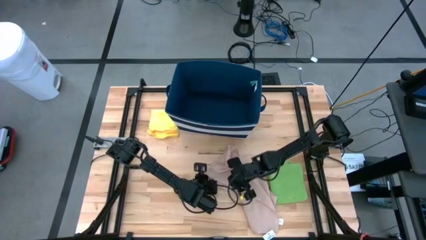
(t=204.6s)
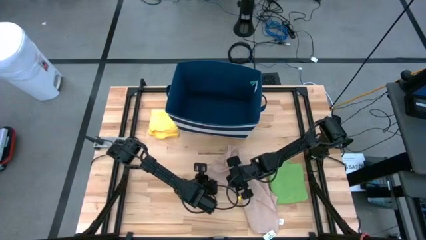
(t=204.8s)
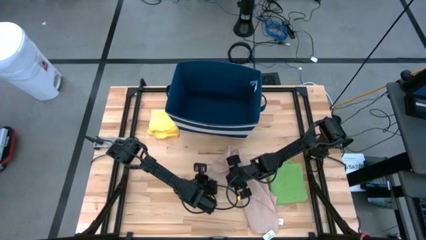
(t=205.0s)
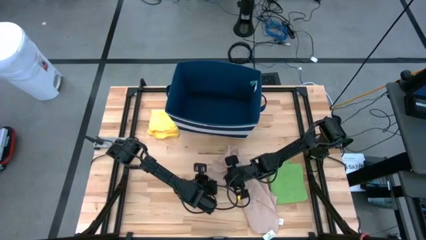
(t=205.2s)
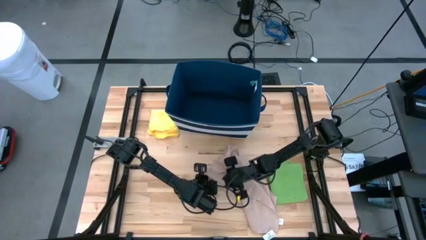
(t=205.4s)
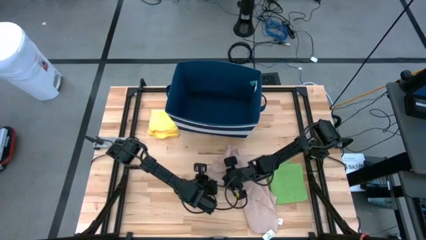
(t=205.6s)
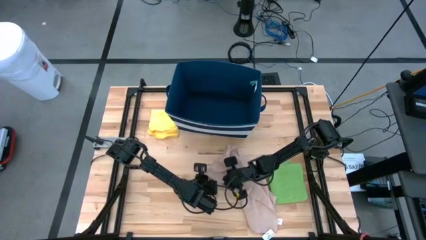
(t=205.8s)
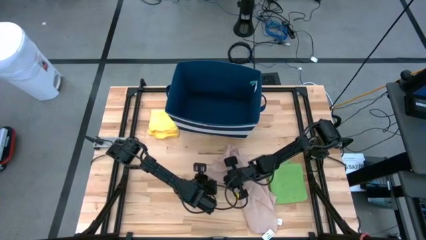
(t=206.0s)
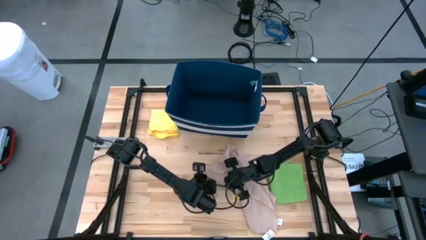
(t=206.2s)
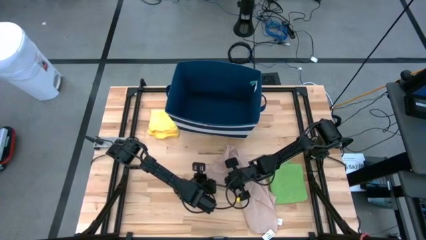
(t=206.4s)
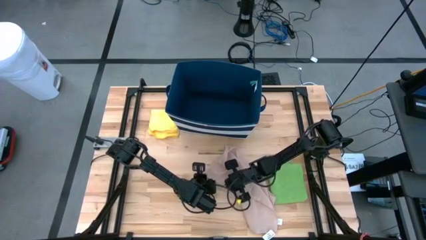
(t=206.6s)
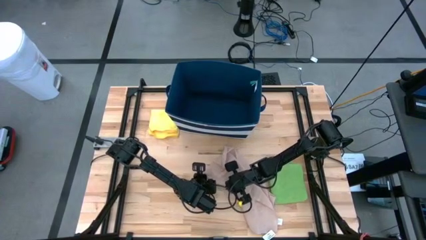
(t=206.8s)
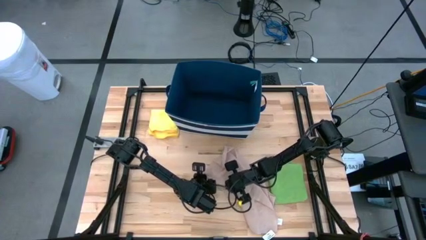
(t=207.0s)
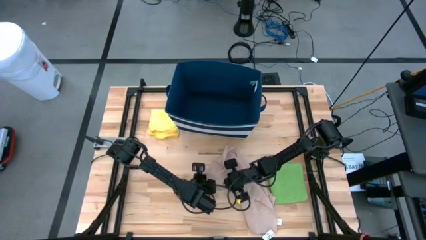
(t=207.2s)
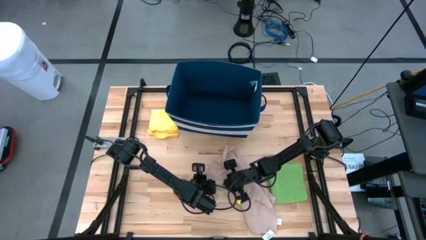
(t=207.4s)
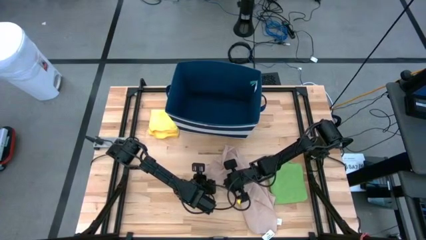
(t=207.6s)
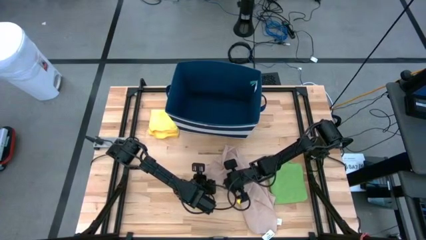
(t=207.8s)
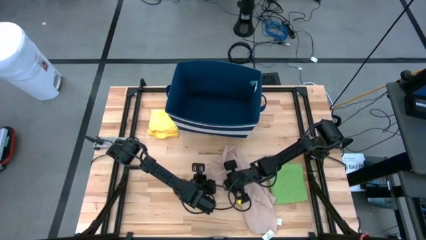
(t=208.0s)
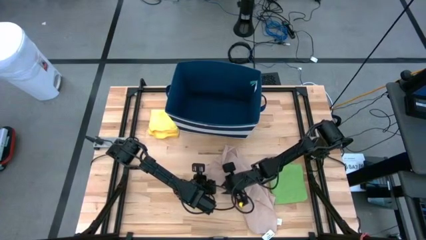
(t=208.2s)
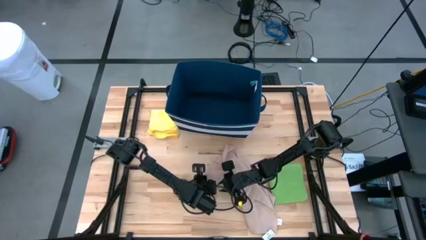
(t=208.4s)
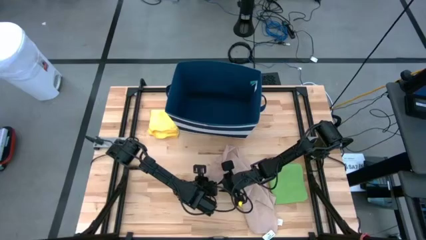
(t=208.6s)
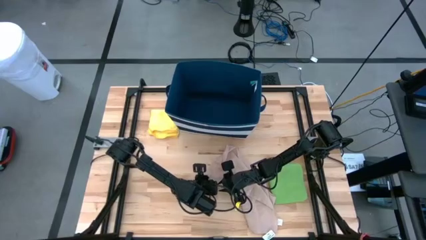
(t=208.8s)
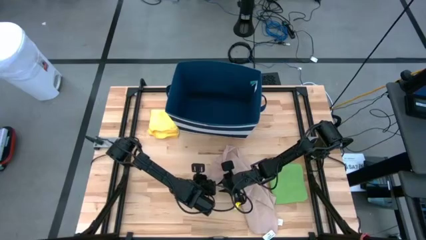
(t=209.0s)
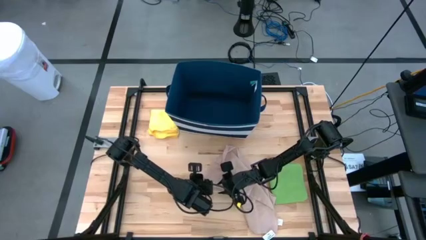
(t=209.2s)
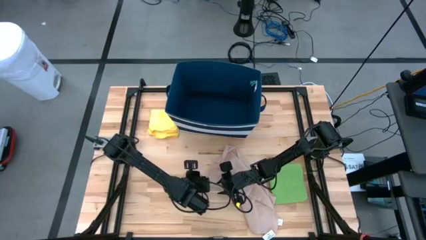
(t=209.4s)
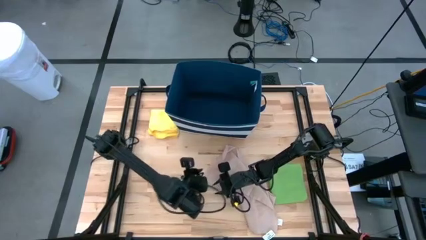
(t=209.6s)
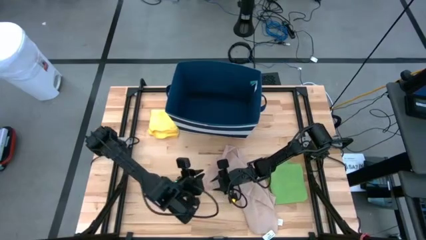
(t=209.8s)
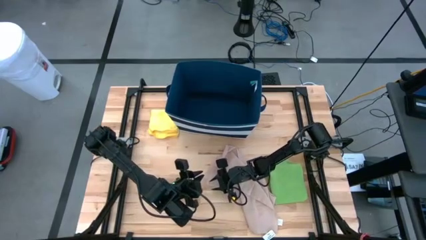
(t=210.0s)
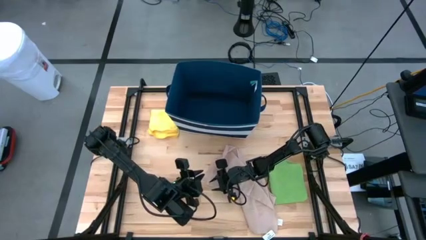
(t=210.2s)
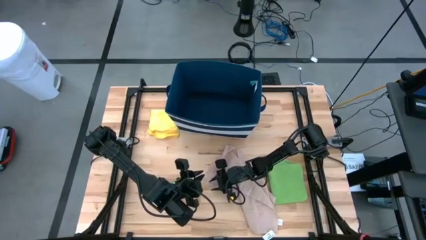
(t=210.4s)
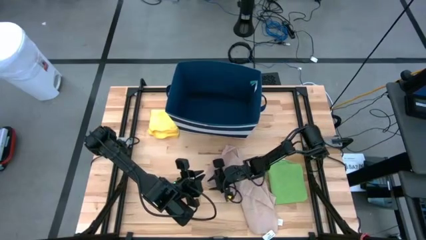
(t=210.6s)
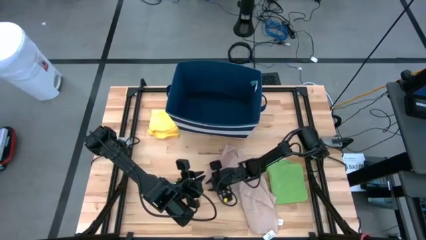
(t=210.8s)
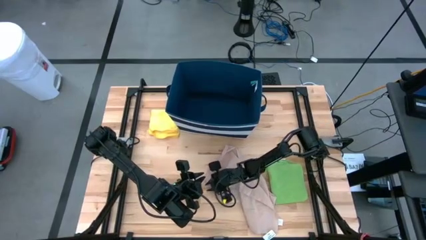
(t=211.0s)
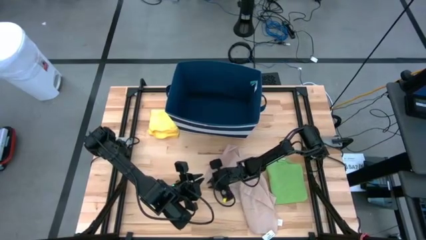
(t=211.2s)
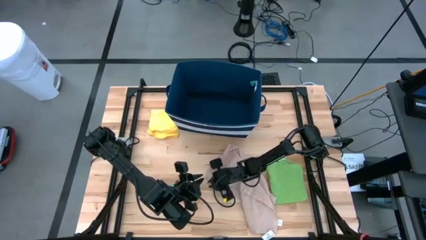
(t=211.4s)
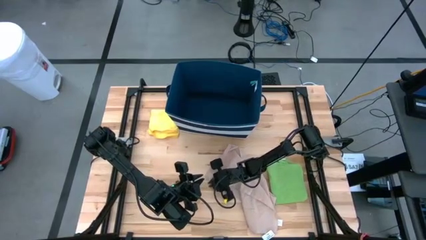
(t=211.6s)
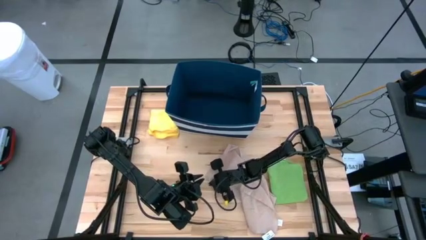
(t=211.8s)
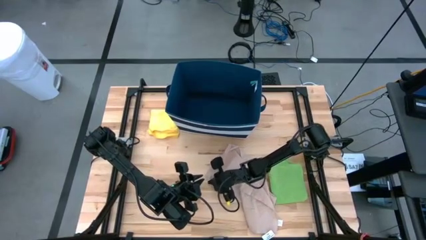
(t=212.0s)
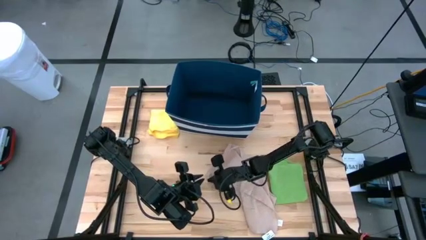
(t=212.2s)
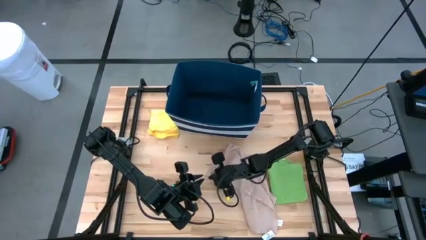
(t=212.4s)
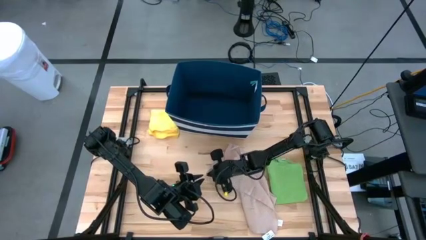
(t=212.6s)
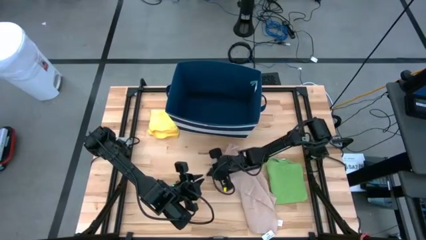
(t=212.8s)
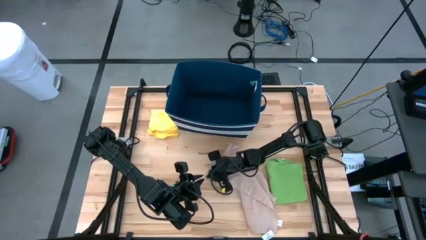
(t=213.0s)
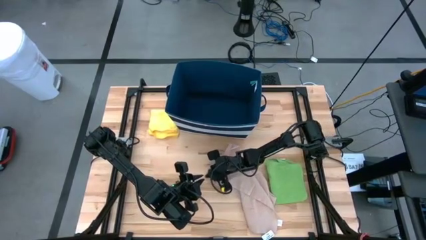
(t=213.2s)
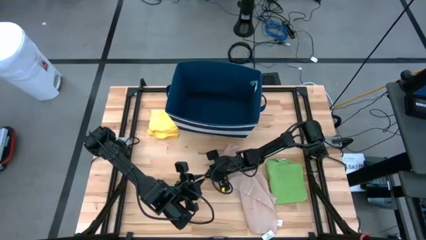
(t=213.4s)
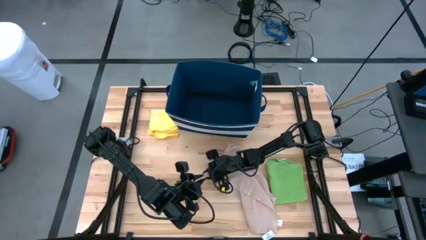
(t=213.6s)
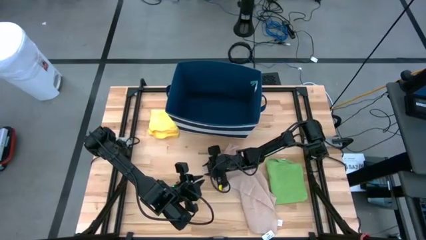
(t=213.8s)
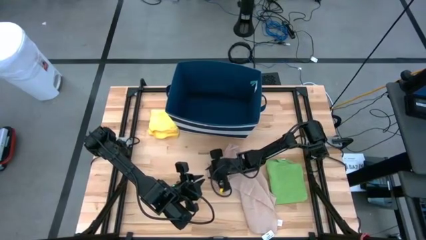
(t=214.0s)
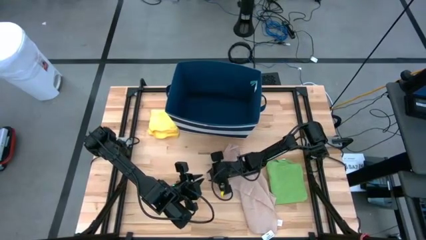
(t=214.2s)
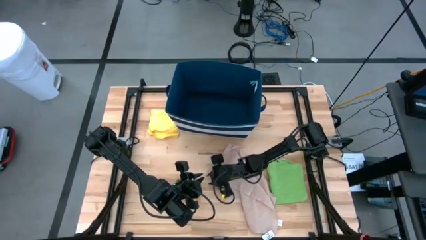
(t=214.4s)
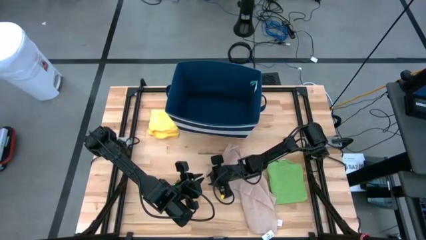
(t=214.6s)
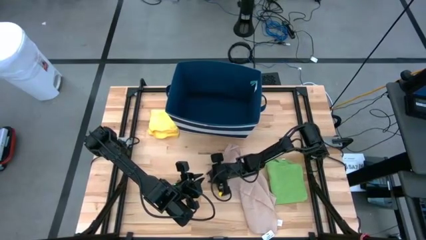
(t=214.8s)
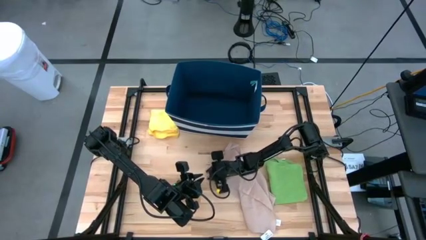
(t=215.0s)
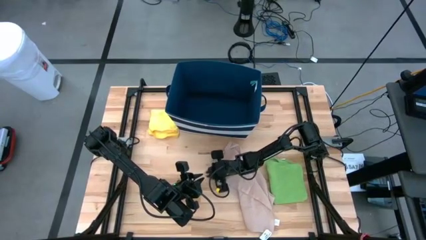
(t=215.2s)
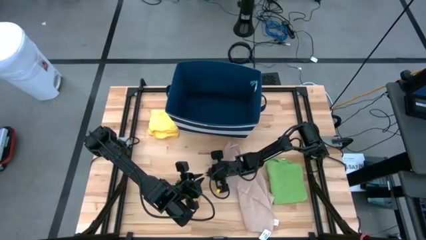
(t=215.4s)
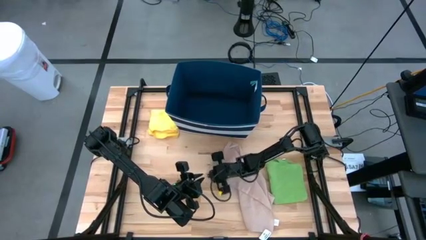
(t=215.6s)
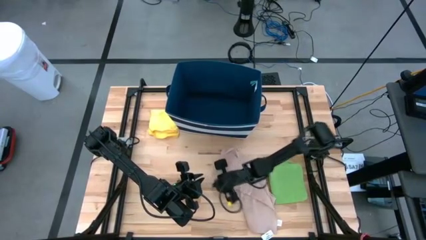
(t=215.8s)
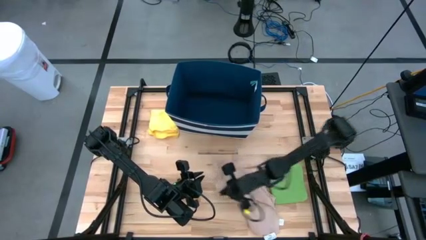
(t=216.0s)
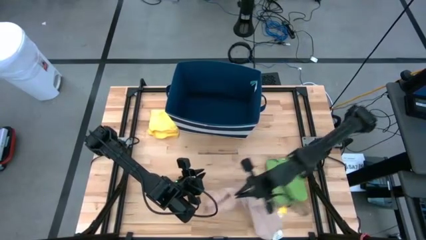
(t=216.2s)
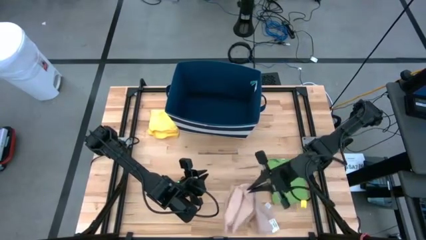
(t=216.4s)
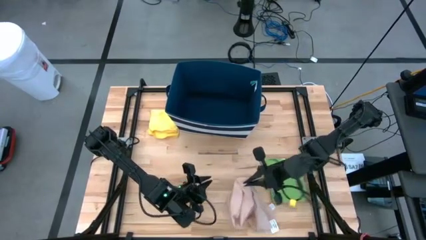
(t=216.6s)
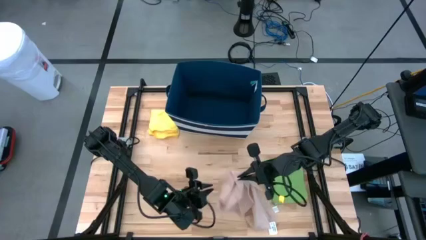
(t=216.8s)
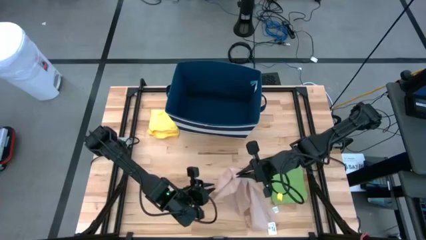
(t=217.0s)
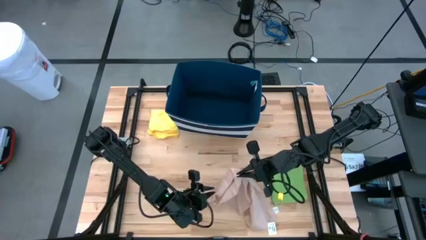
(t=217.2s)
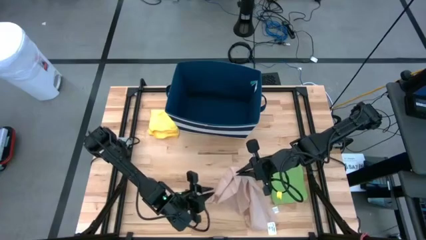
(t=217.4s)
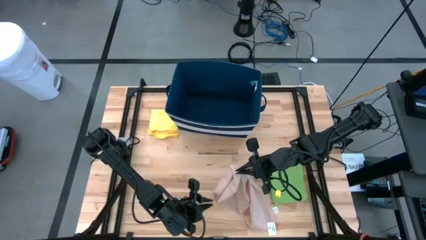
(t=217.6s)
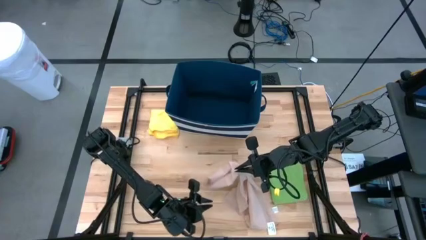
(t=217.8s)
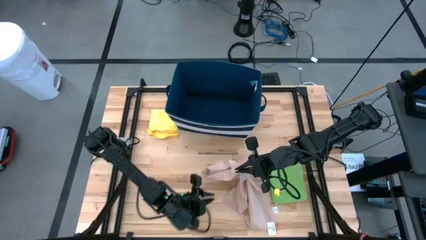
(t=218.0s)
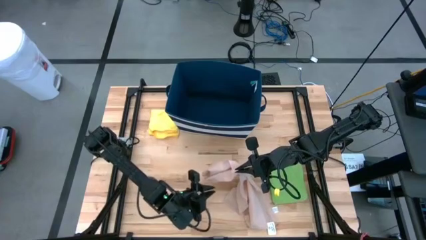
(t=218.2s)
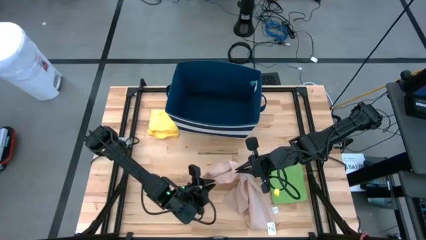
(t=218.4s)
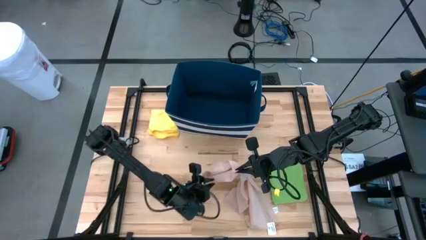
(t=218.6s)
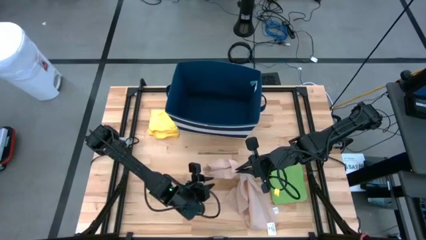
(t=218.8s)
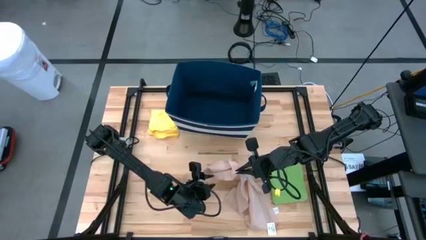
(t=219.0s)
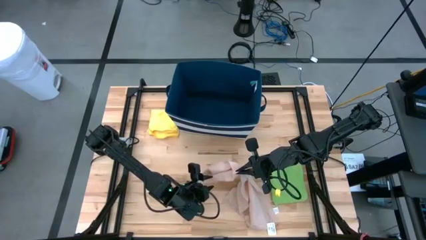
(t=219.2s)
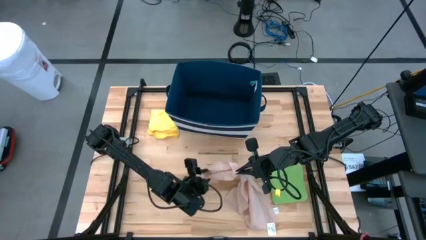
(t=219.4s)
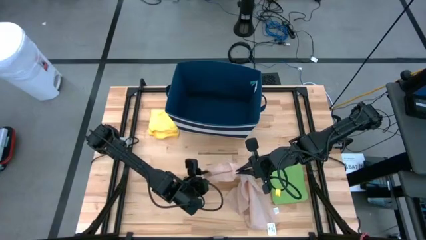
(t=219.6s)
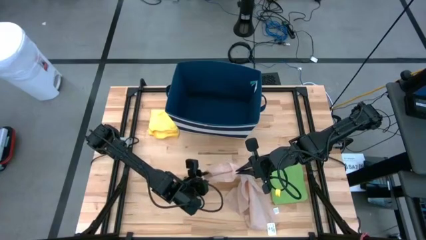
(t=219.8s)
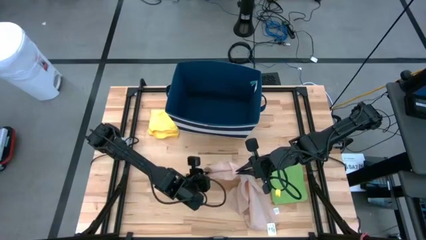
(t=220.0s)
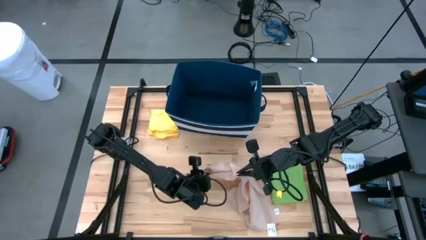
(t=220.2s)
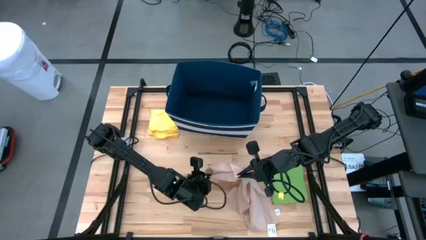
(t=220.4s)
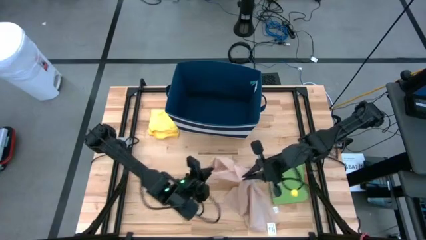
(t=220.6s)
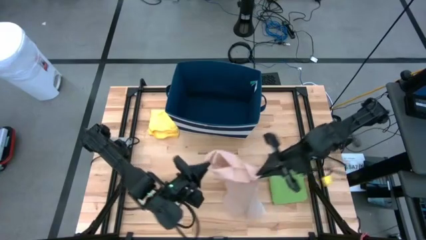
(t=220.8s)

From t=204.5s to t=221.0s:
Task: Fold towel
Fold the light pink towel

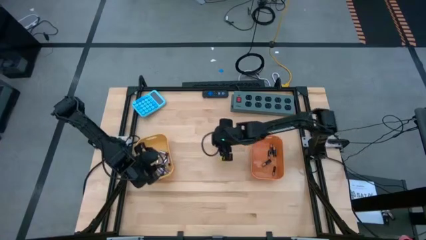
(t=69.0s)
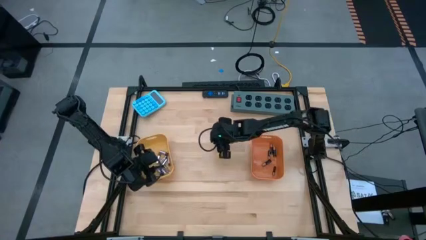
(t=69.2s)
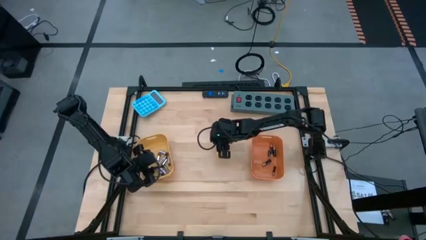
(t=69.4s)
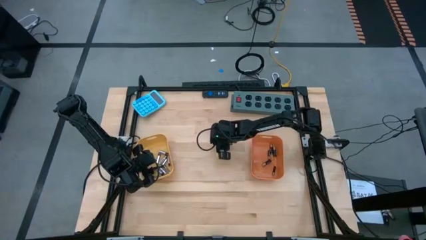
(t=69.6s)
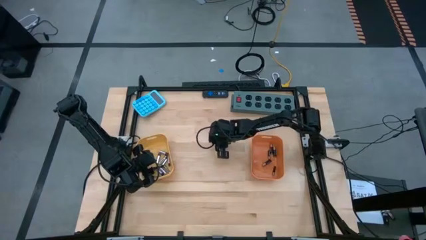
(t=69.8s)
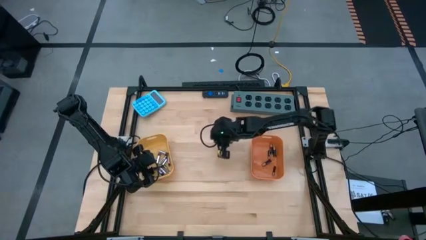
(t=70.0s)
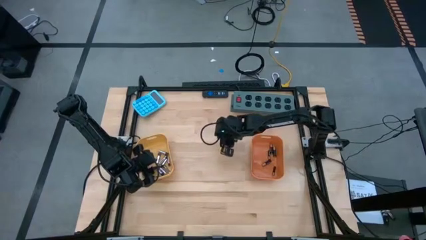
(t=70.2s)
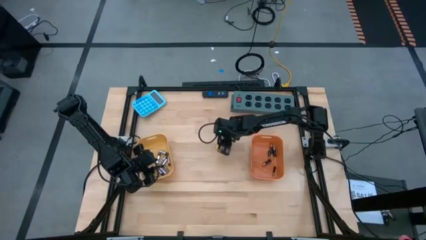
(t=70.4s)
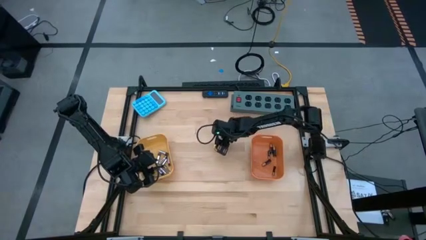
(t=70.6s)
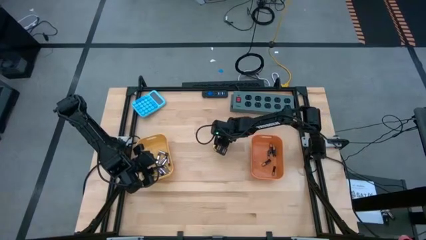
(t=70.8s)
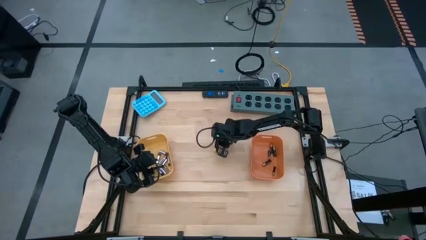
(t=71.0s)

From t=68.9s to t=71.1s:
Task: Sort batteries
Put the brown battery into the orange bin
